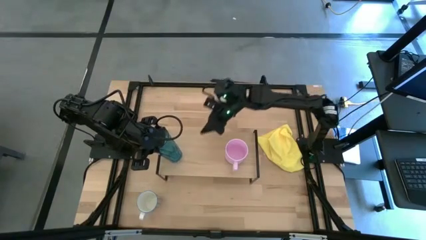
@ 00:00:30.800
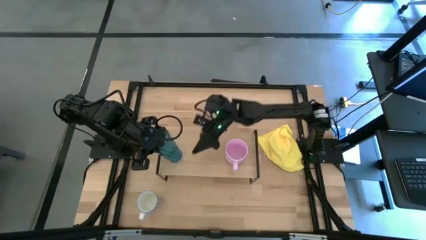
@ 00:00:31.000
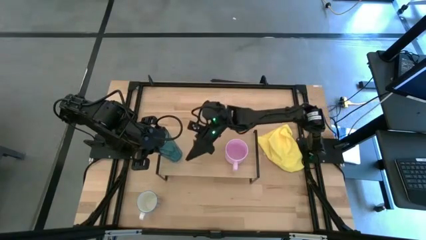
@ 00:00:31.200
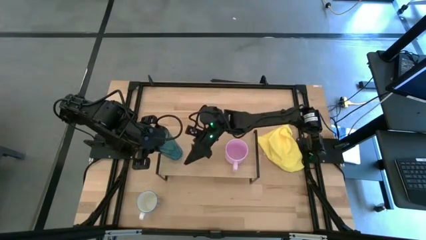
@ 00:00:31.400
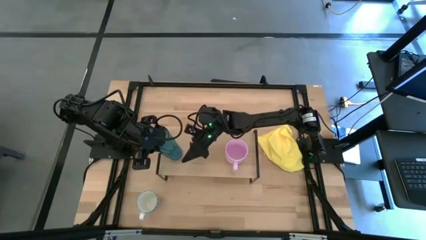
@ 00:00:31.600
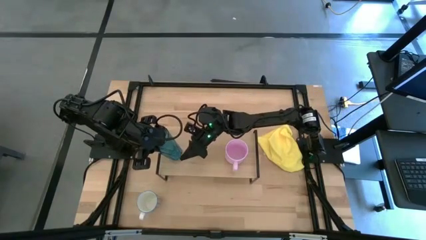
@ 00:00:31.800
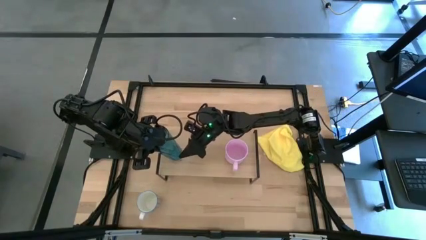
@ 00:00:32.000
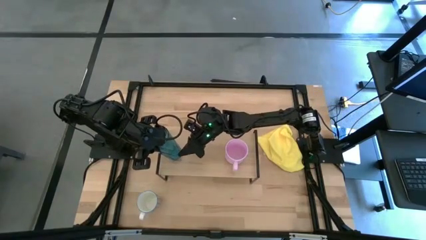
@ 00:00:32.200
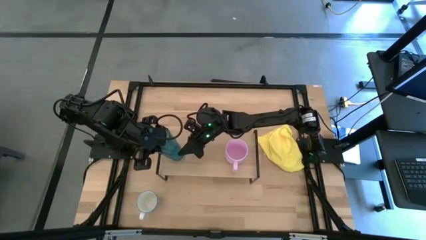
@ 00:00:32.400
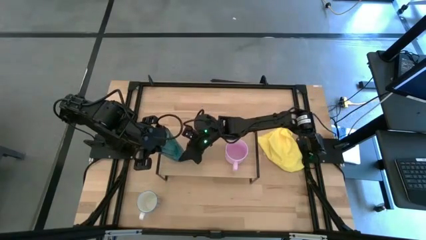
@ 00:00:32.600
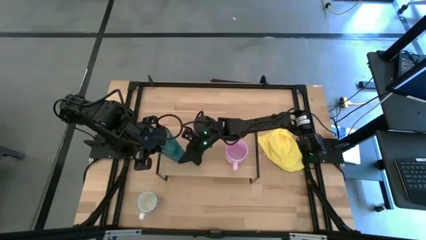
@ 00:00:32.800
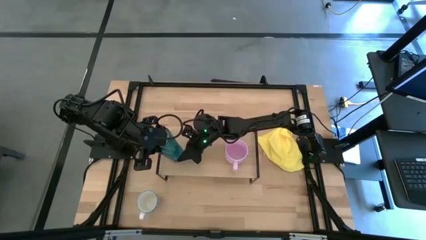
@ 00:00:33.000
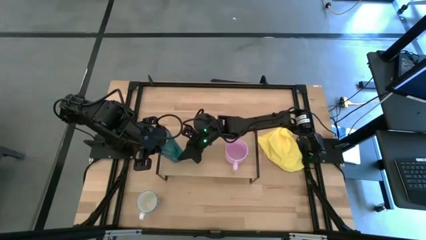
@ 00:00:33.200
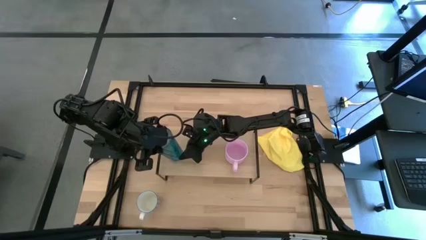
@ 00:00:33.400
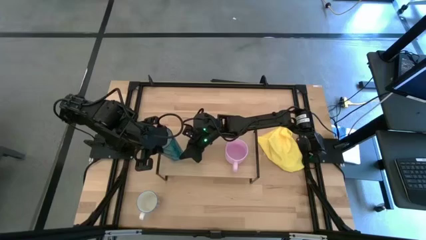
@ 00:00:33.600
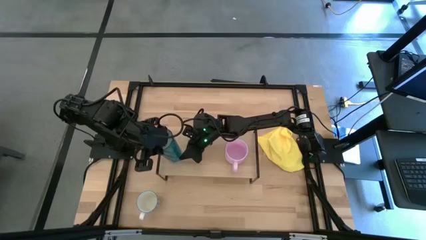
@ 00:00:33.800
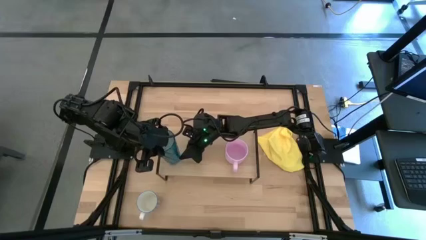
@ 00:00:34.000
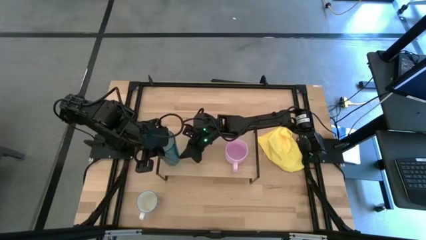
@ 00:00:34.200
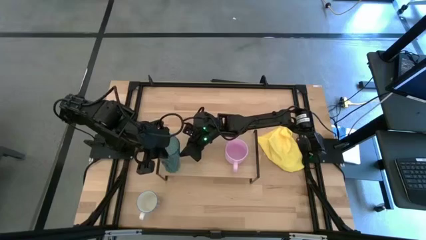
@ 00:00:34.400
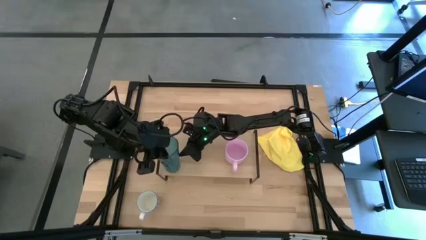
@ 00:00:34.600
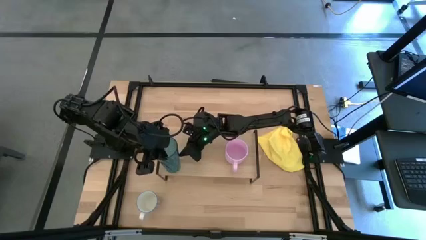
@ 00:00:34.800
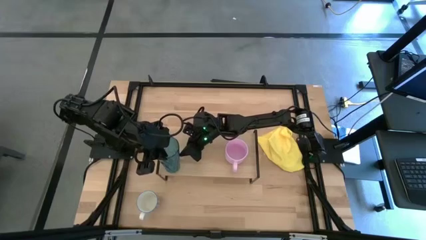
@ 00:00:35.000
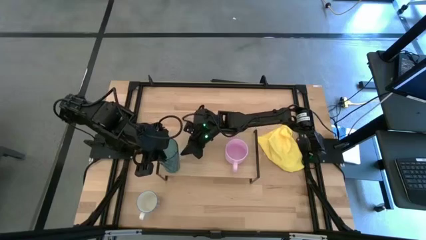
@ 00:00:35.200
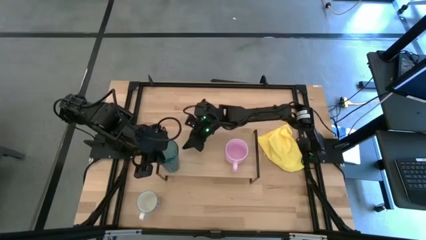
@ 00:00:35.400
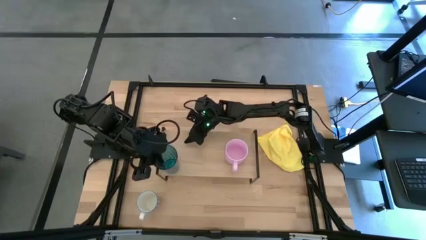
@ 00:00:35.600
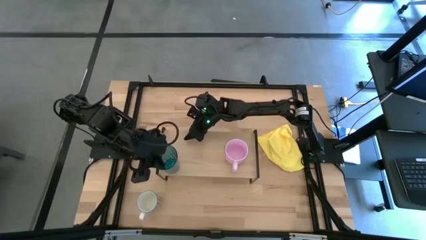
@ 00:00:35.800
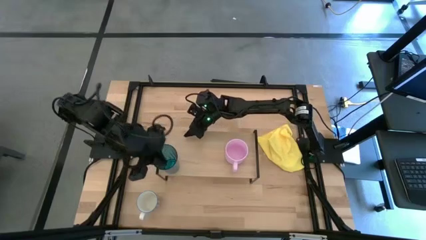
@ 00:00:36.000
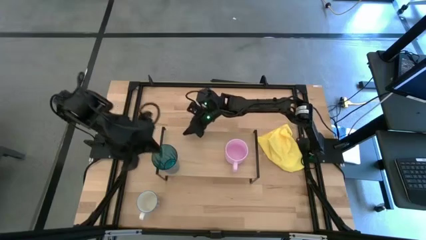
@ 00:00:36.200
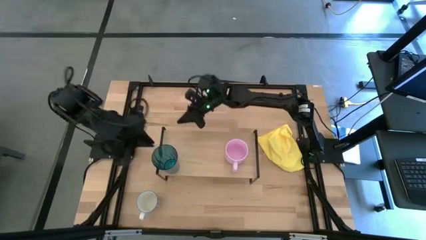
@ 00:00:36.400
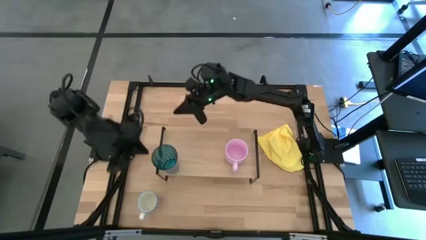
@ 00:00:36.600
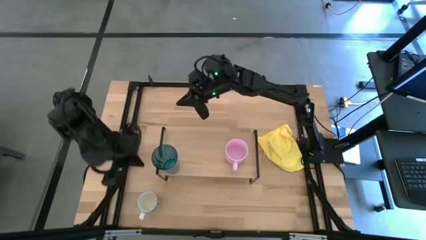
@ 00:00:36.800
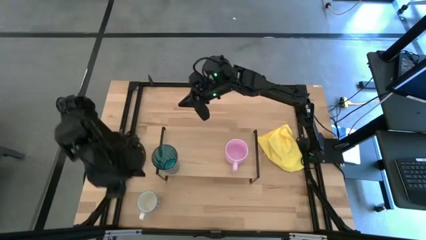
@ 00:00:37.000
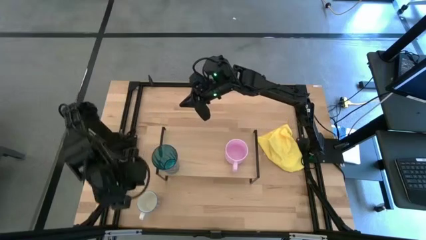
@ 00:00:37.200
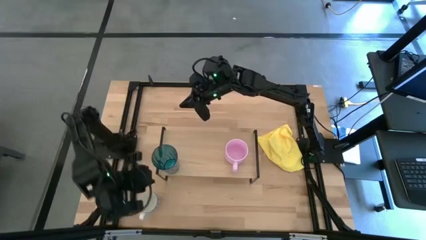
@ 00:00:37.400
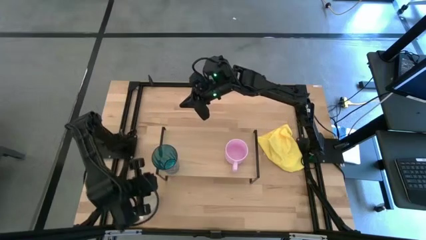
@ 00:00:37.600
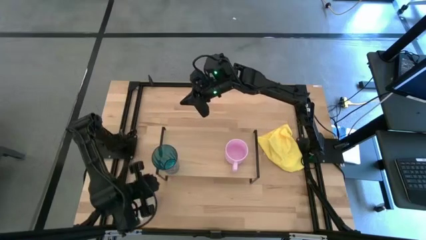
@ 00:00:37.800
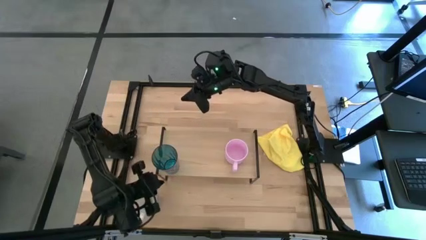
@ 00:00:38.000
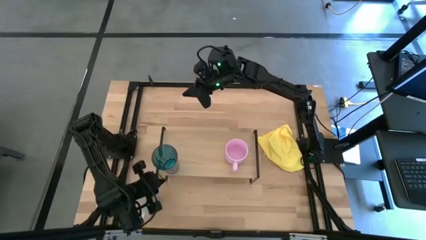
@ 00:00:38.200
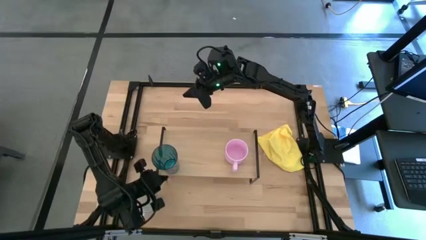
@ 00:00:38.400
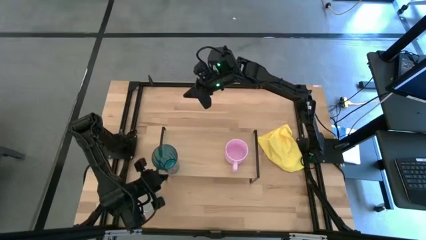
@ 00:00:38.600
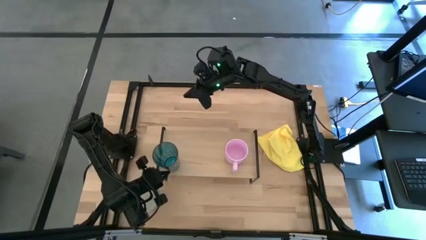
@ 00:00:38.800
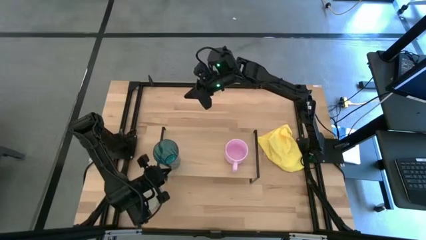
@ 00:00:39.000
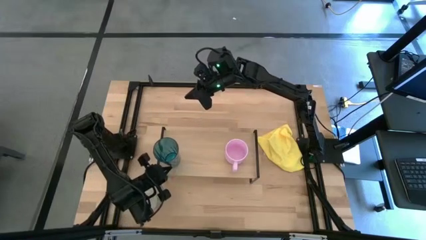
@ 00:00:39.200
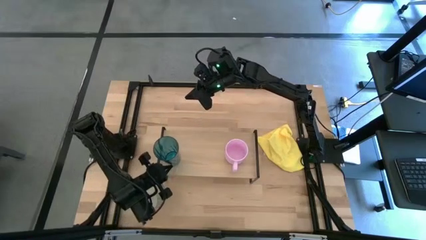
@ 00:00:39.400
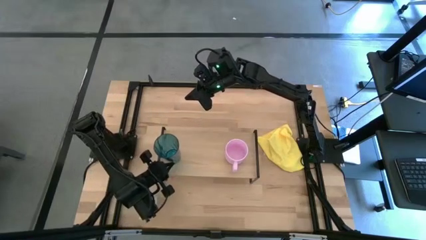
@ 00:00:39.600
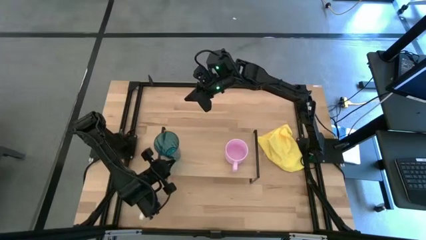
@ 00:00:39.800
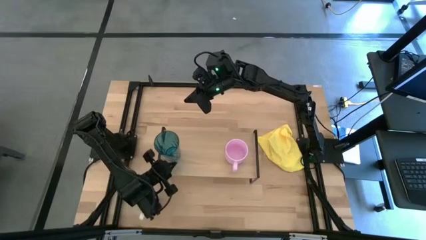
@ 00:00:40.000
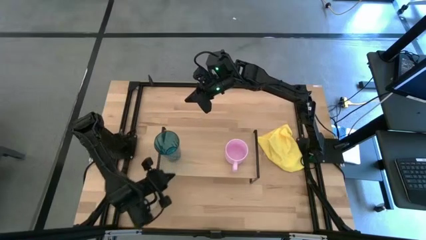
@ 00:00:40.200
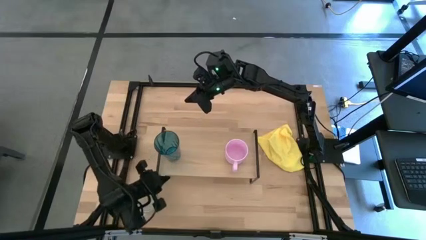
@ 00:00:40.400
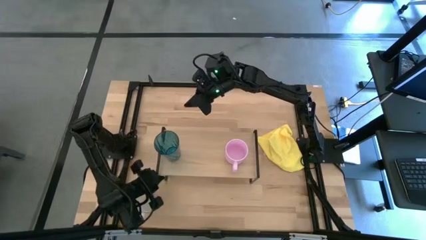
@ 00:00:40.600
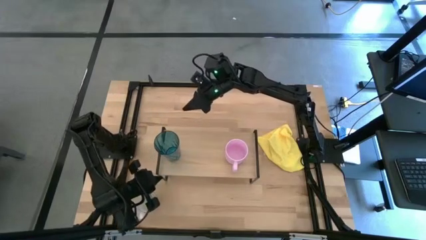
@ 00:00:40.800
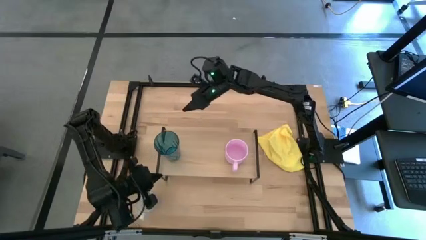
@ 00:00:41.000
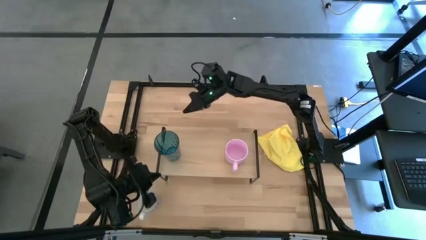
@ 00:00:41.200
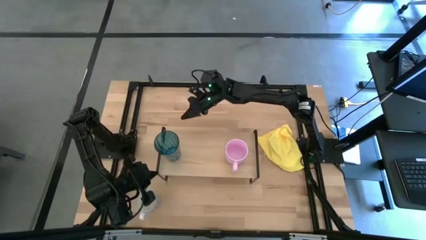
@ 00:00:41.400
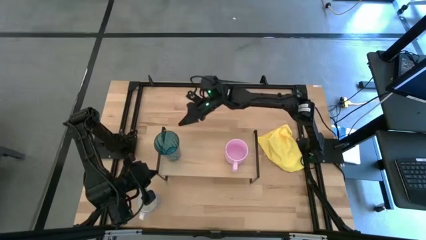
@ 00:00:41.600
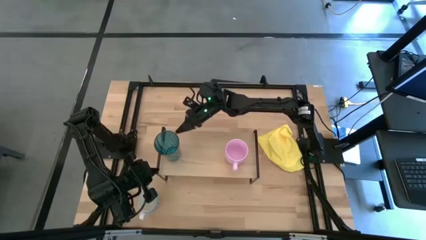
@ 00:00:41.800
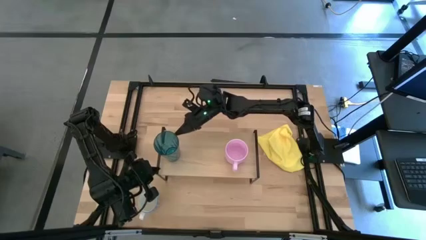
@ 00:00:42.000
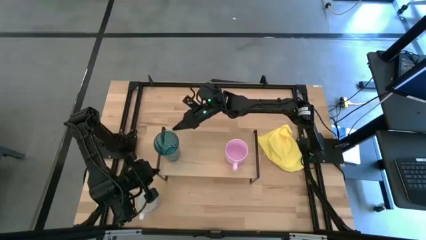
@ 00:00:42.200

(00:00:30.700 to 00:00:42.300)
Task: Stack small to large cups/mugs on shelf
Put the blue cup on the shelf
